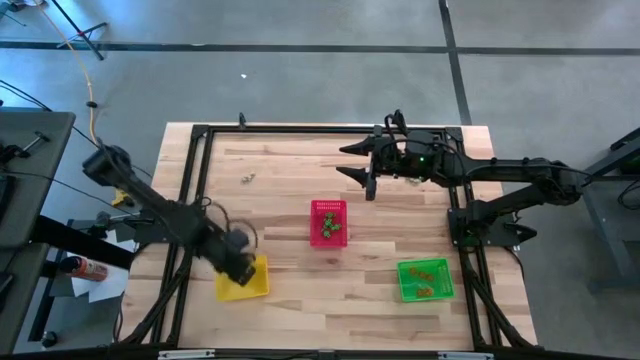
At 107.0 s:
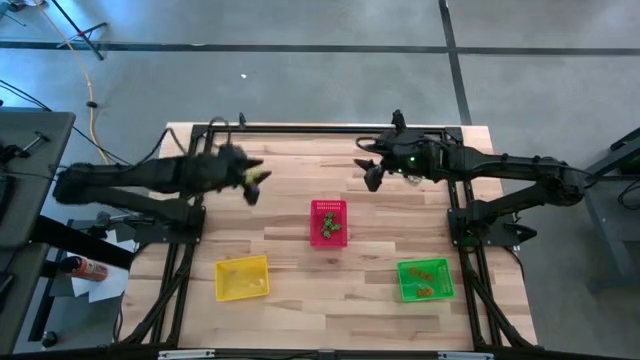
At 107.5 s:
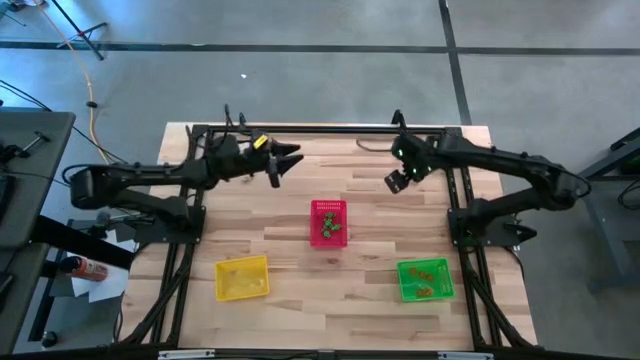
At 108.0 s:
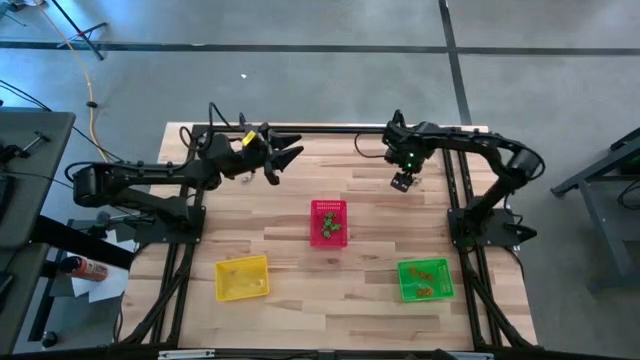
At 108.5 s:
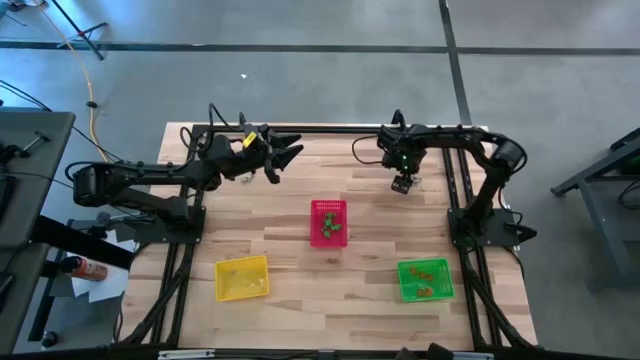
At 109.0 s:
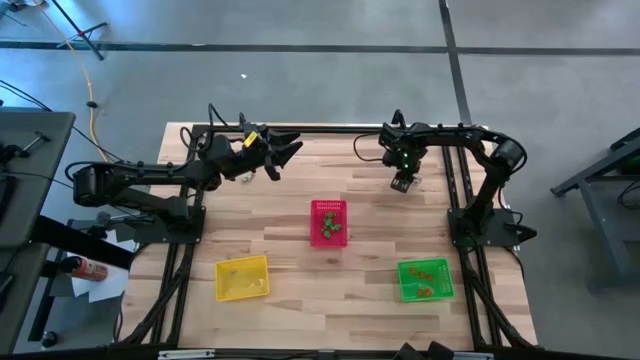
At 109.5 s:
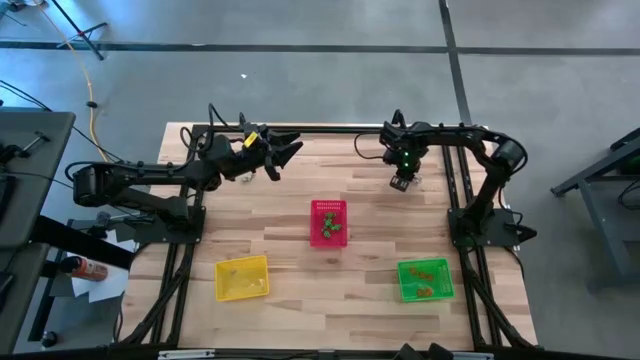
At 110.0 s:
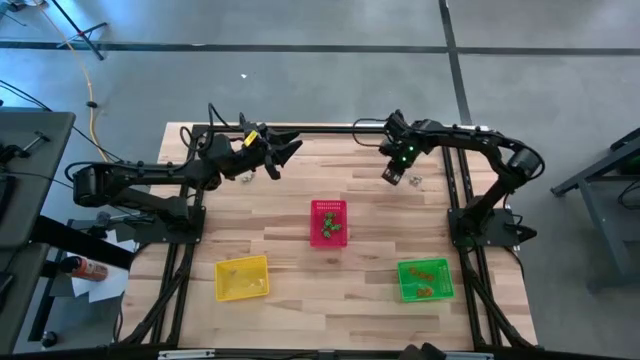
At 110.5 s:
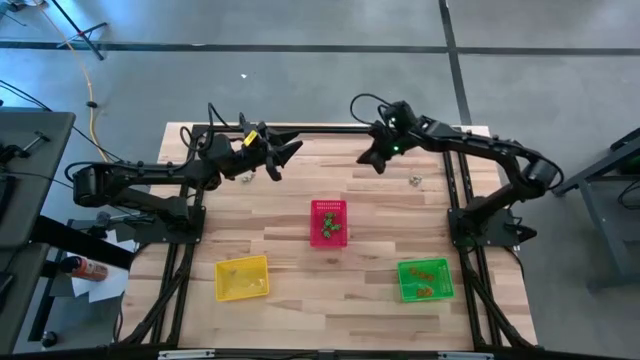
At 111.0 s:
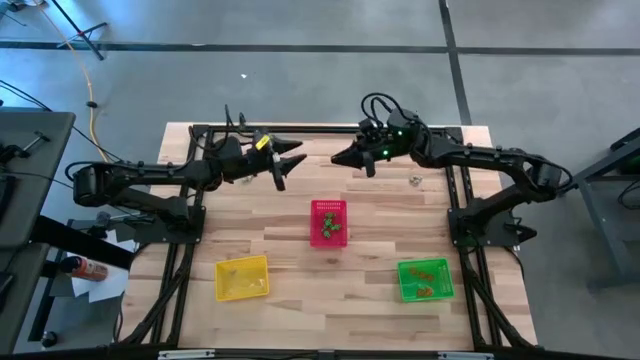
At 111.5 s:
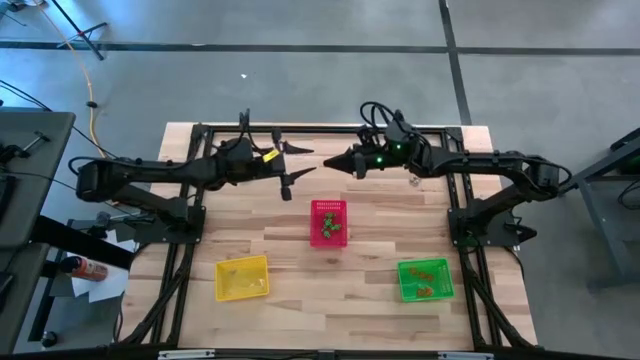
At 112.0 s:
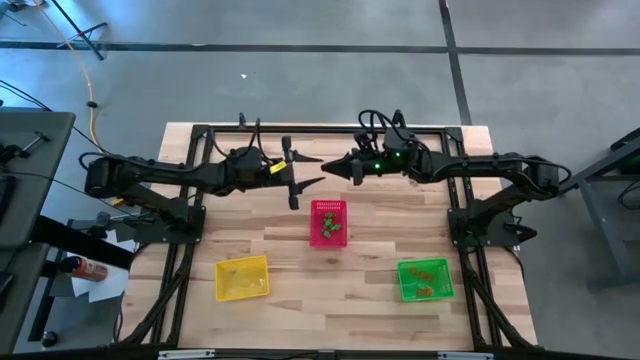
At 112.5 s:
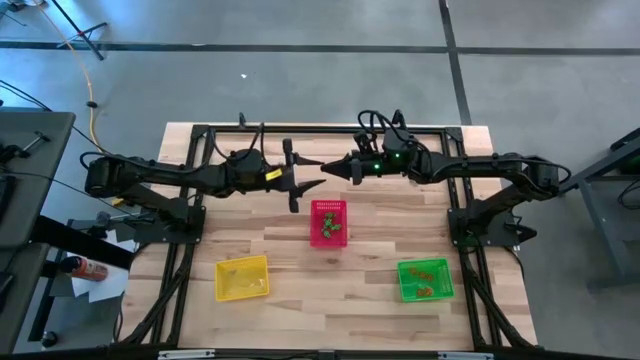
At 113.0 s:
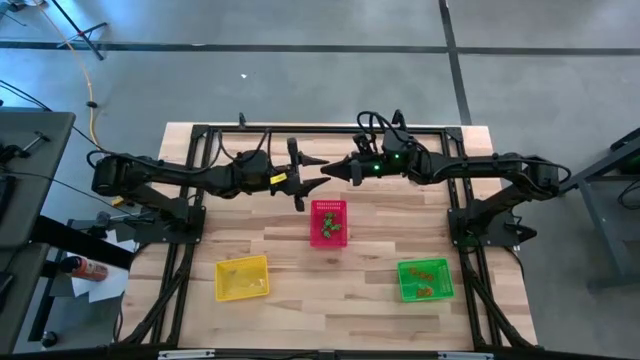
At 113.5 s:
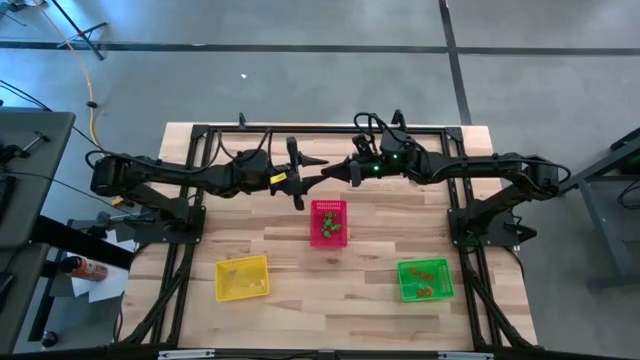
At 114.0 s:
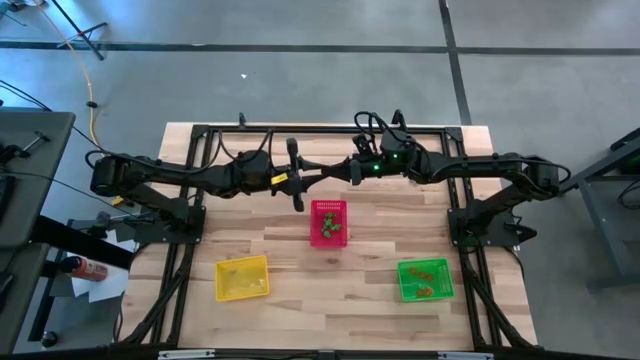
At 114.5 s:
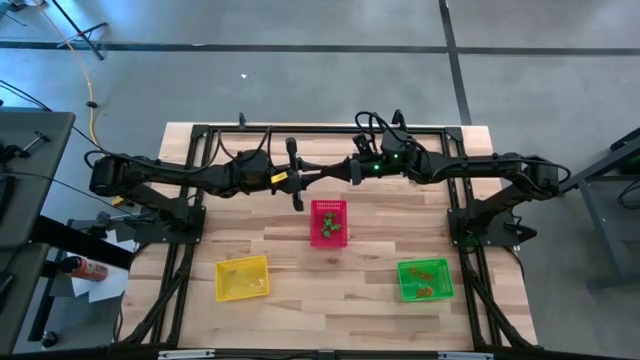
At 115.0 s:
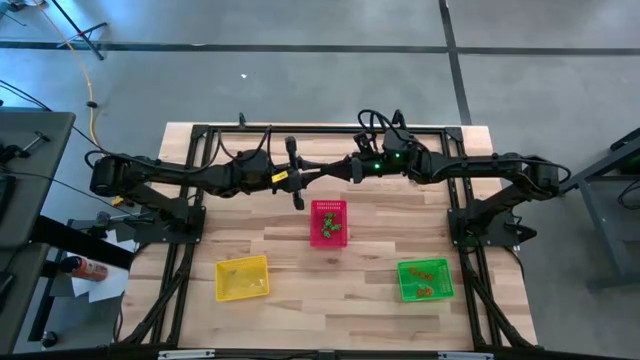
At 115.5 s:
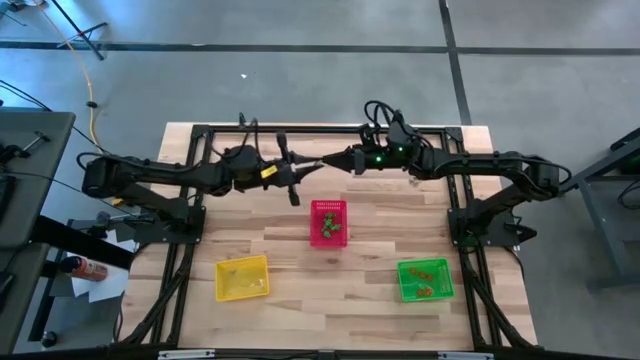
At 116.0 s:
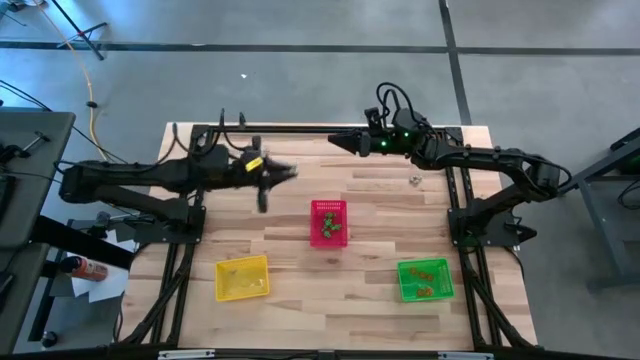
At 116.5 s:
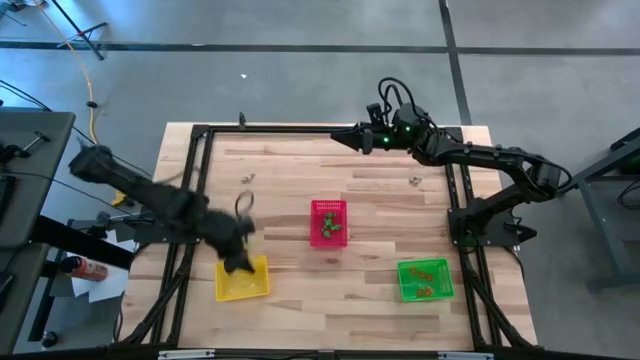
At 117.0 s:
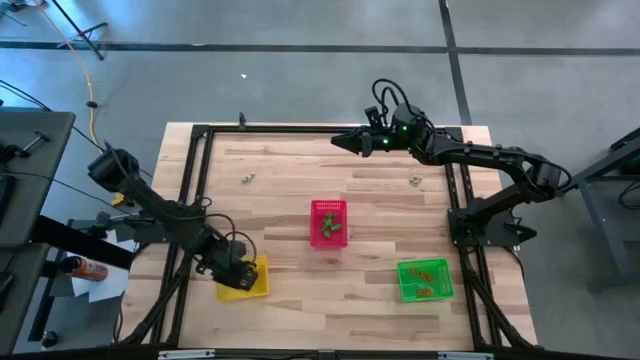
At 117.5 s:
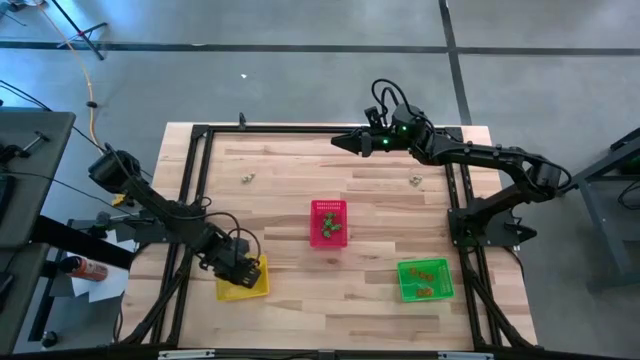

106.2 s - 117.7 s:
Task: Sort Halloween decoration
Put the white skull toy into the yellow bin

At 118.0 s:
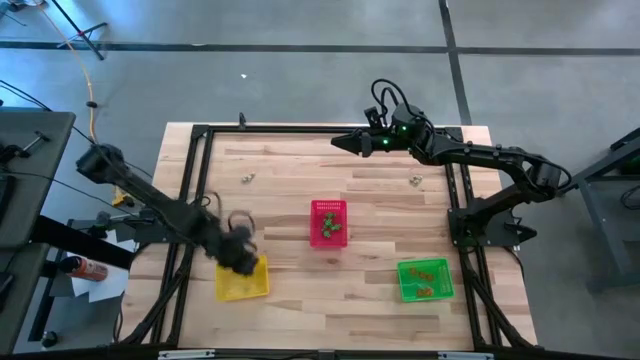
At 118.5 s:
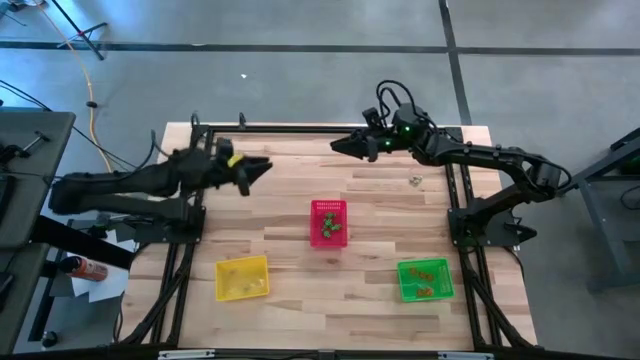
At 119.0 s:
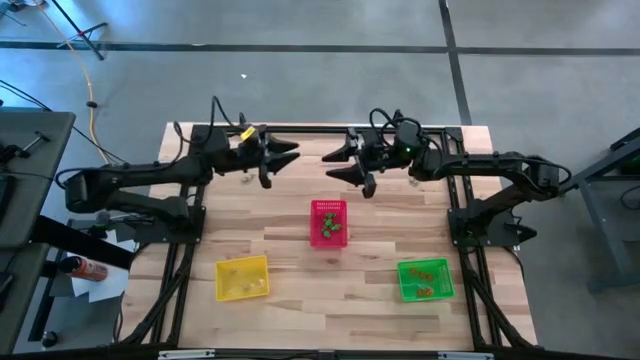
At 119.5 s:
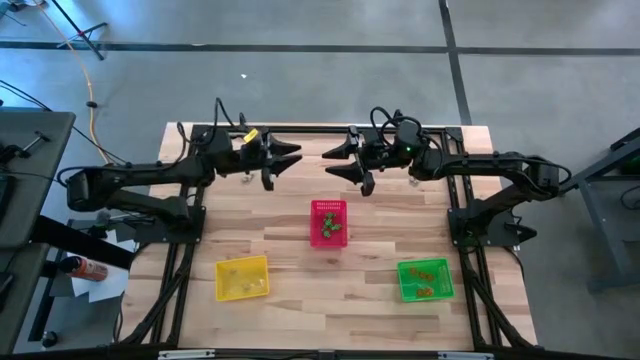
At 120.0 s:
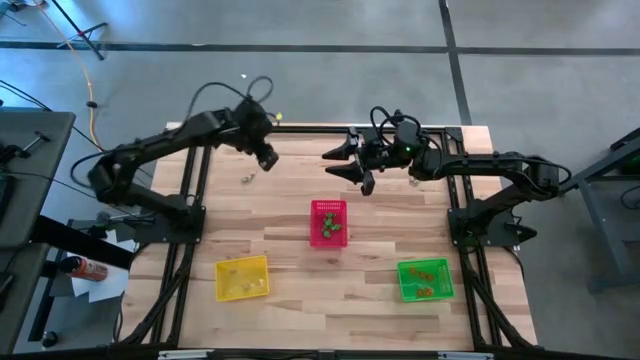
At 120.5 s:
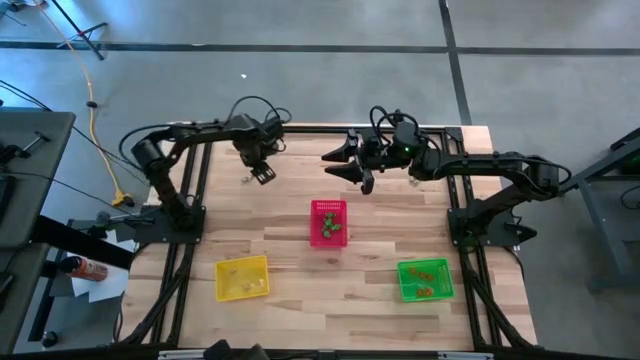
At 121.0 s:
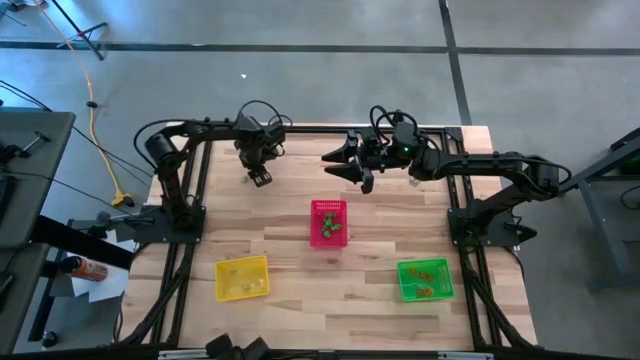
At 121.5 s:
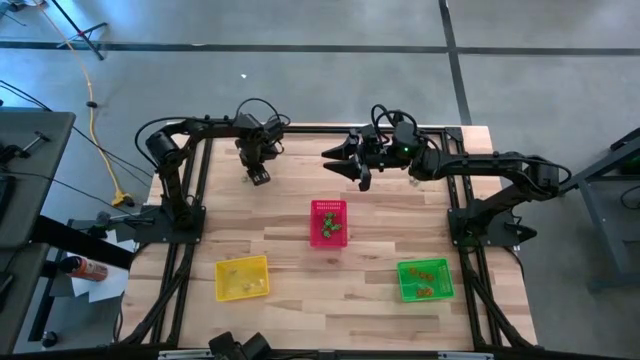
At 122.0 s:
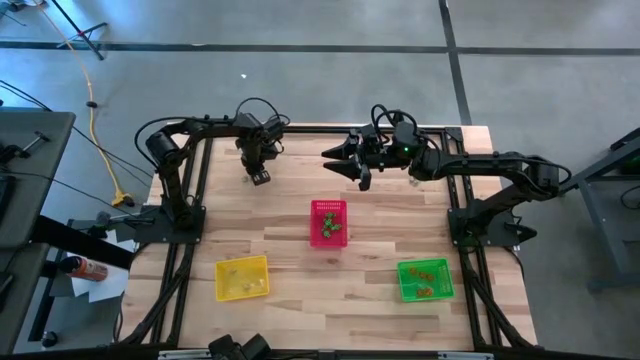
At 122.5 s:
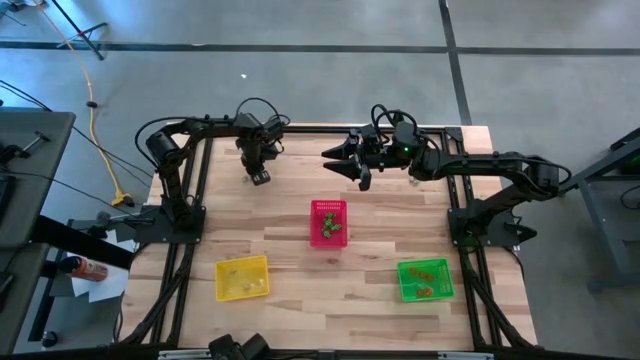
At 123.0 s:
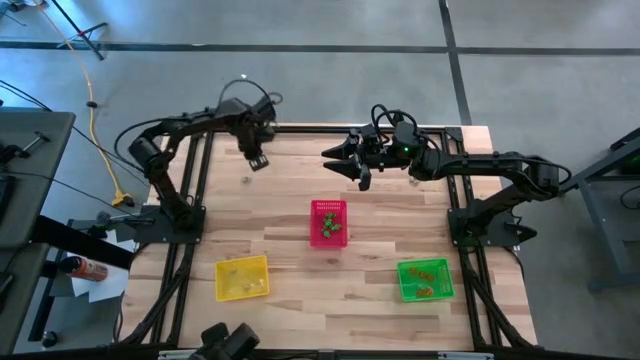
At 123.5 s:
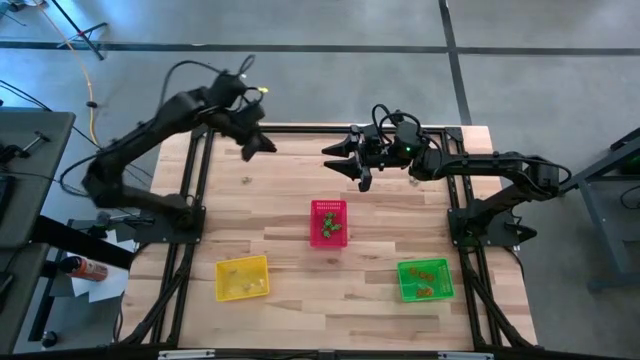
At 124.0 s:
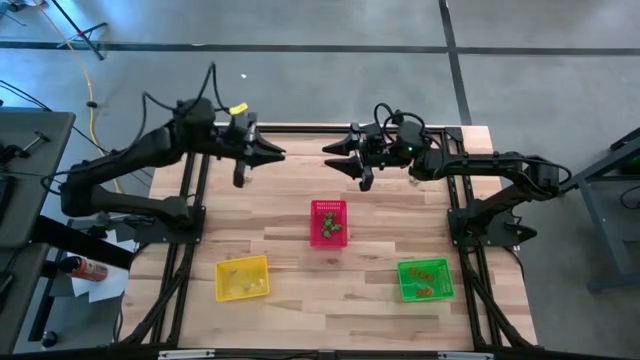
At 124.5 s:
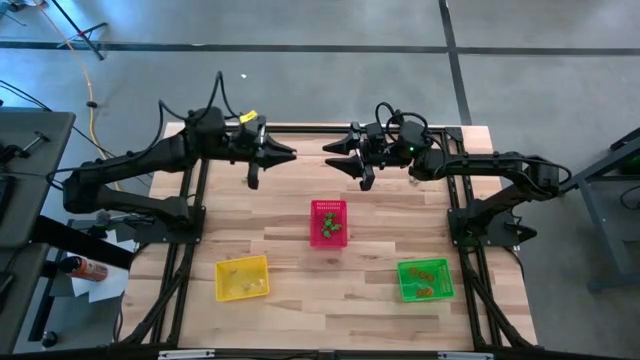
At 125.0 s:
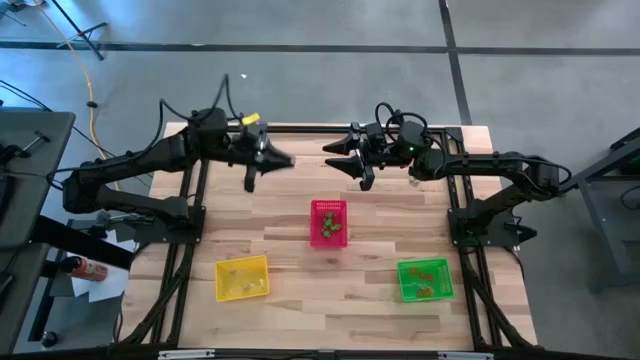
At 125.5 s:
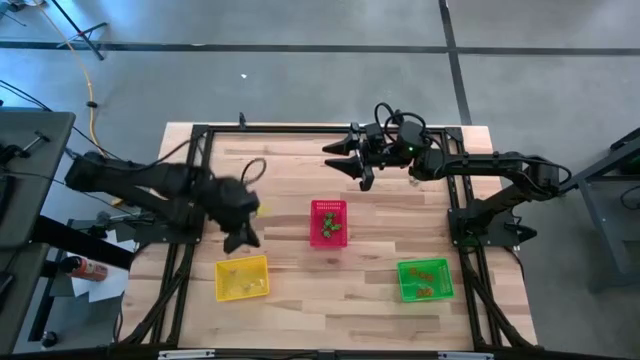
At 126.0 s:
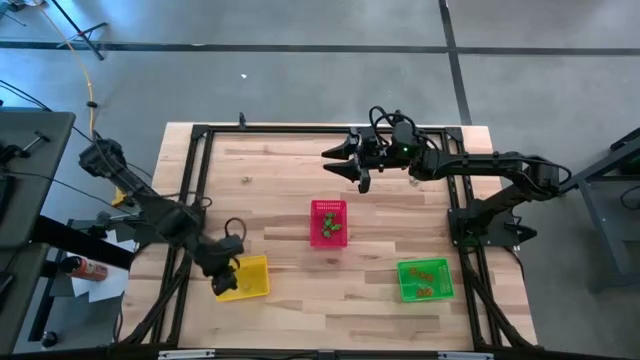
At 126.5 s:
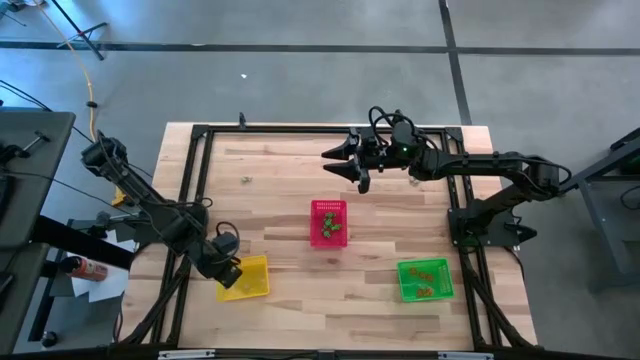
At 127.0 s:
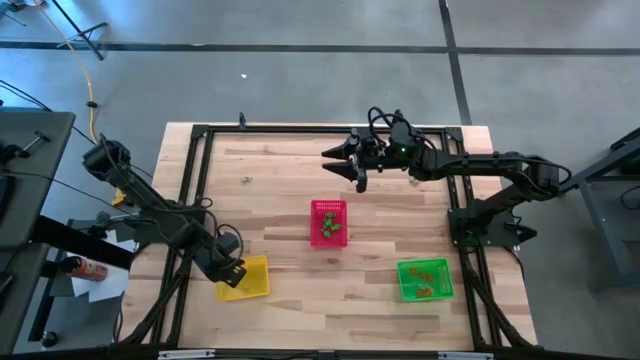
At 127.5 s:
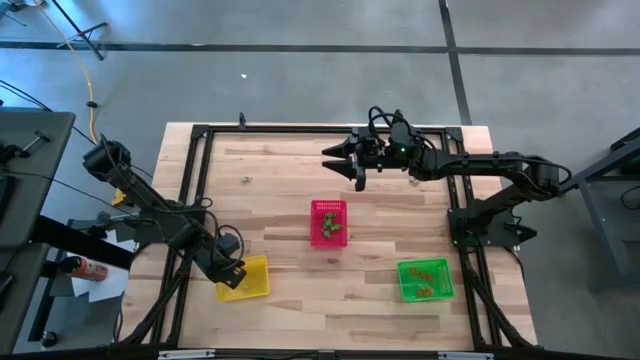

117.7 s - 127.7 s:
Put the white skull toy into the yellow bin

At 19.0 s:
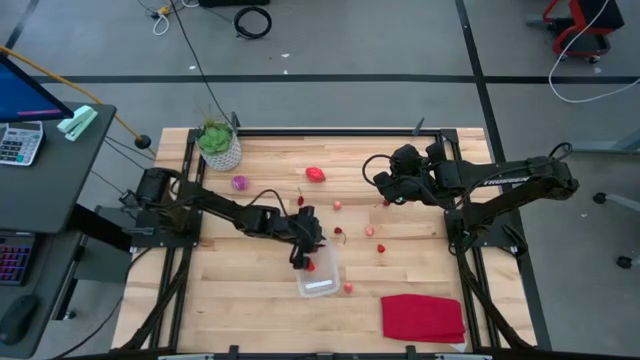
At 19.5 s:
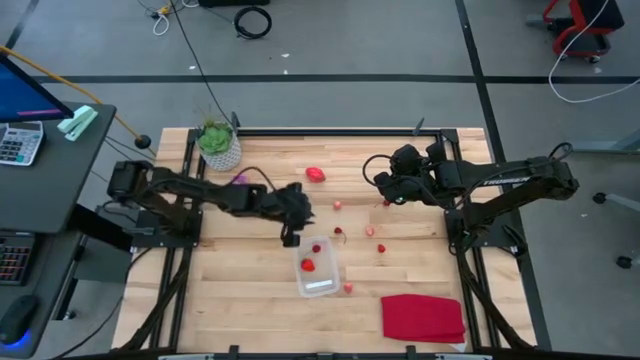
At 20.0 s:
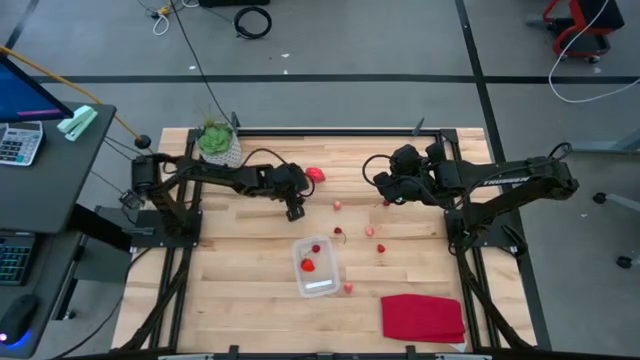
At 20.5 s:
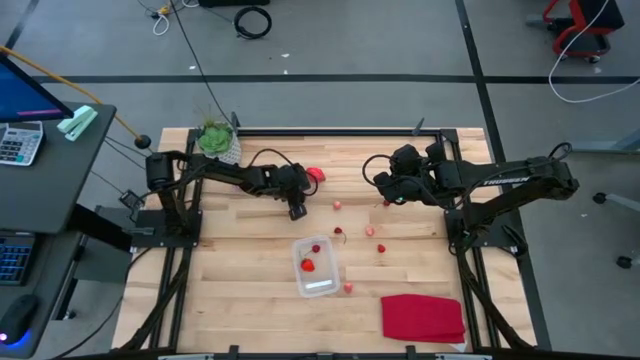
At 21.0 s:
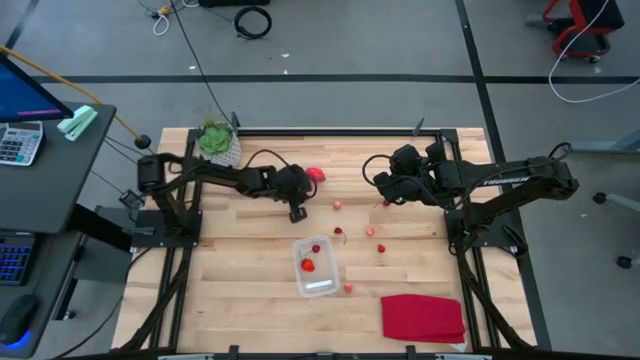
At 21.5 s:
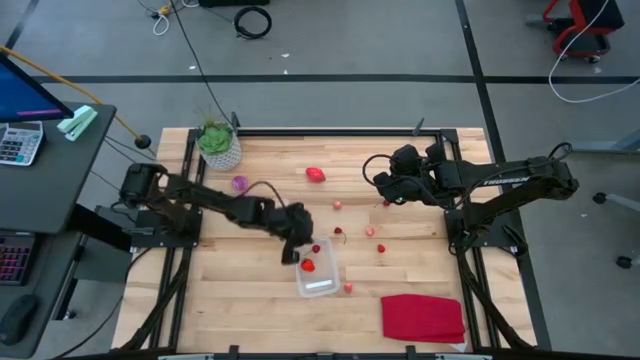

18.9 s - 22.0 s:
Task: Pick and placing Produce into tupperware
Put the top left red cherry into the transparent bin
